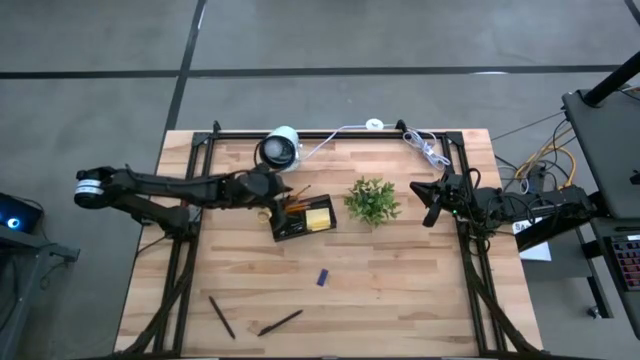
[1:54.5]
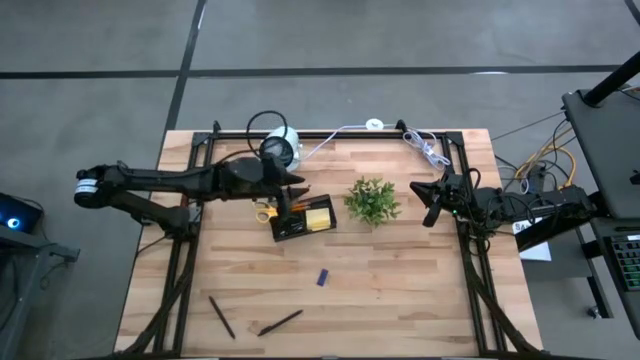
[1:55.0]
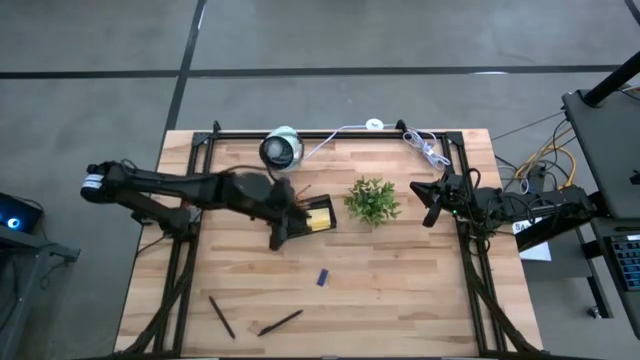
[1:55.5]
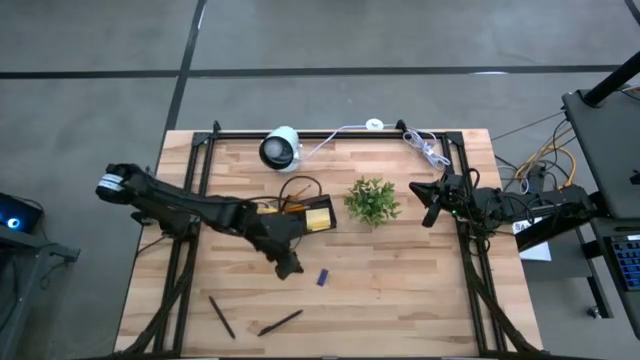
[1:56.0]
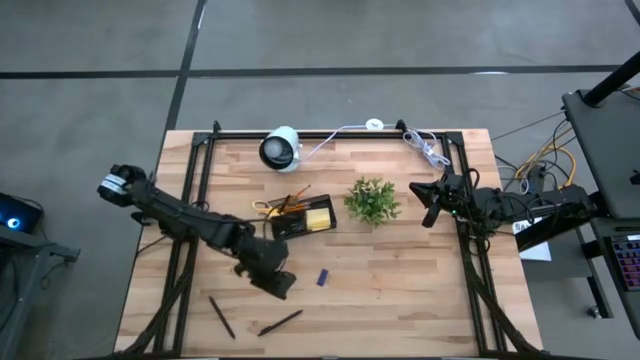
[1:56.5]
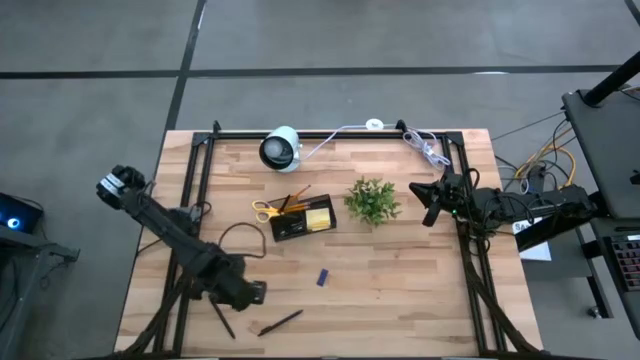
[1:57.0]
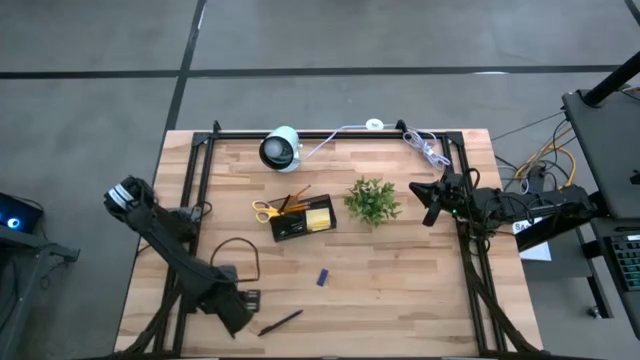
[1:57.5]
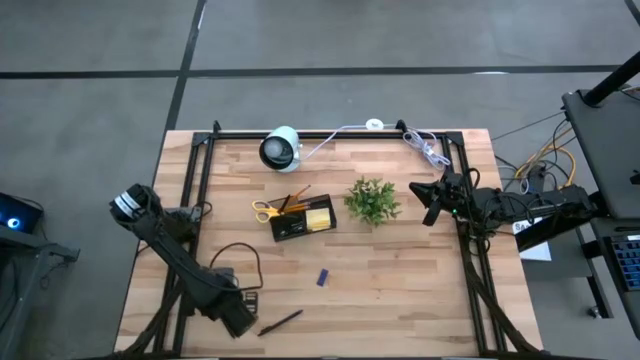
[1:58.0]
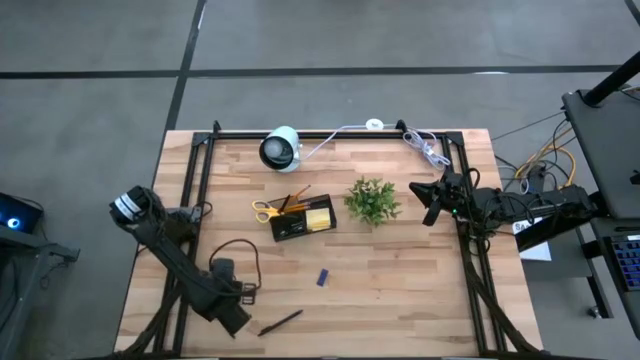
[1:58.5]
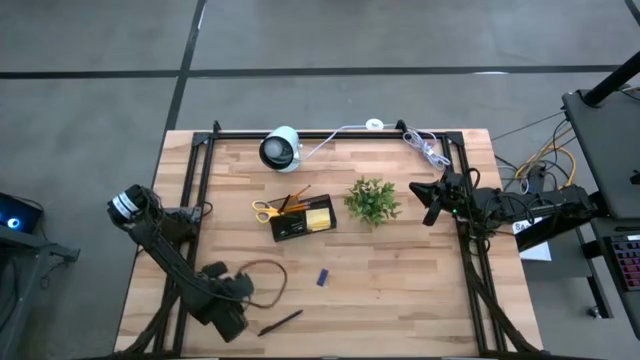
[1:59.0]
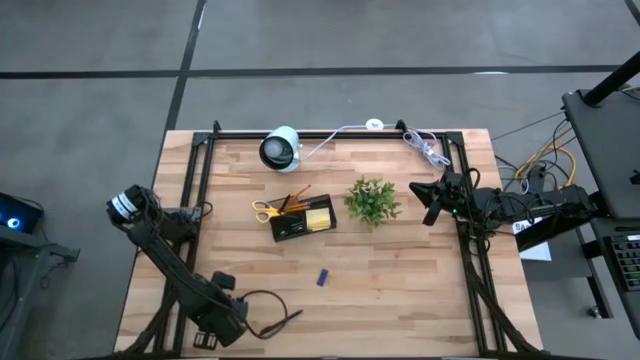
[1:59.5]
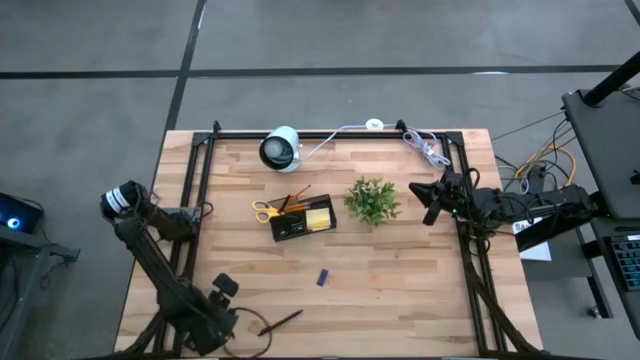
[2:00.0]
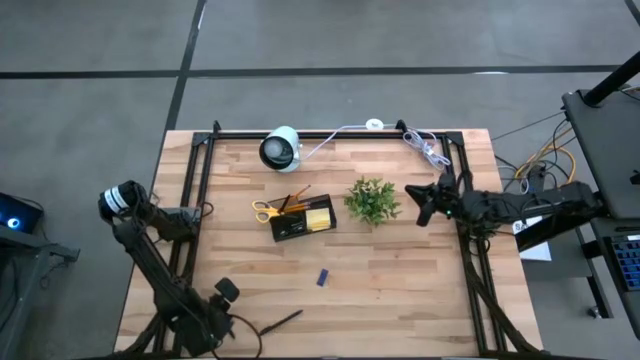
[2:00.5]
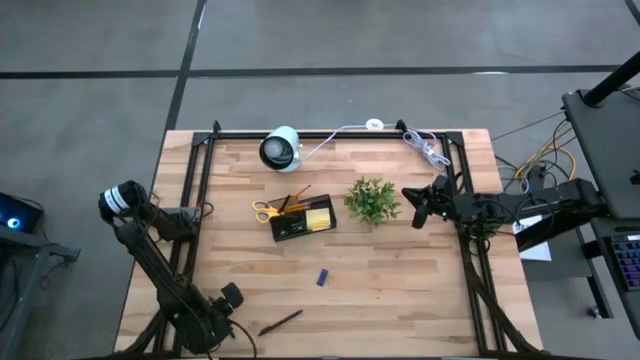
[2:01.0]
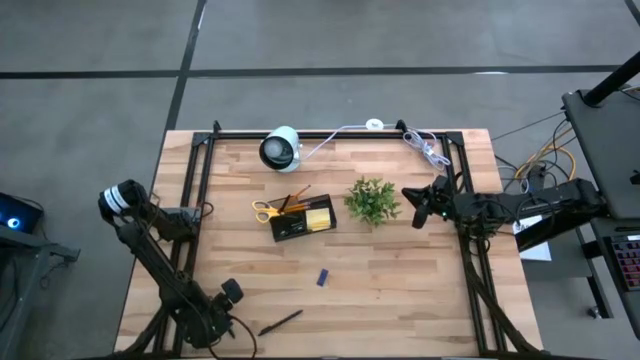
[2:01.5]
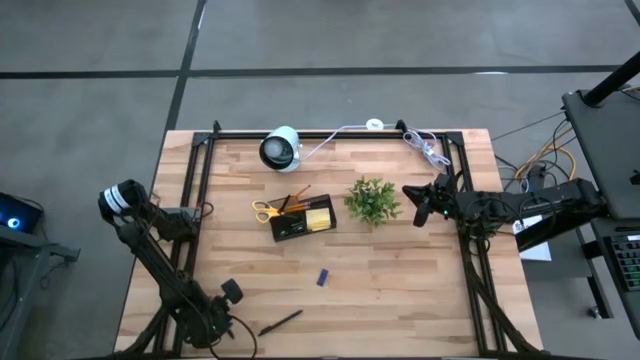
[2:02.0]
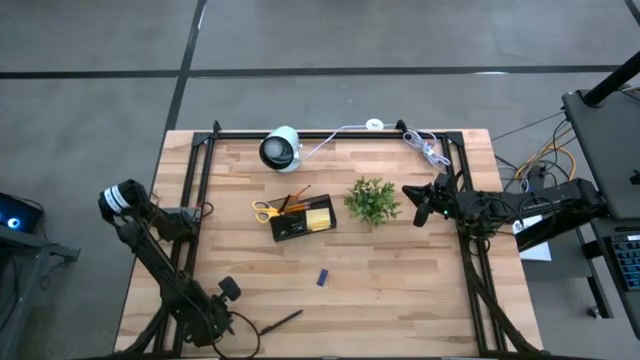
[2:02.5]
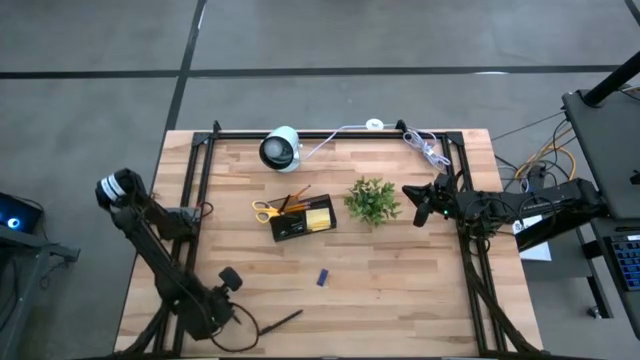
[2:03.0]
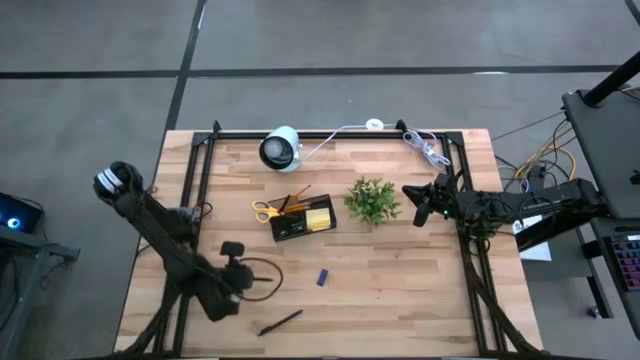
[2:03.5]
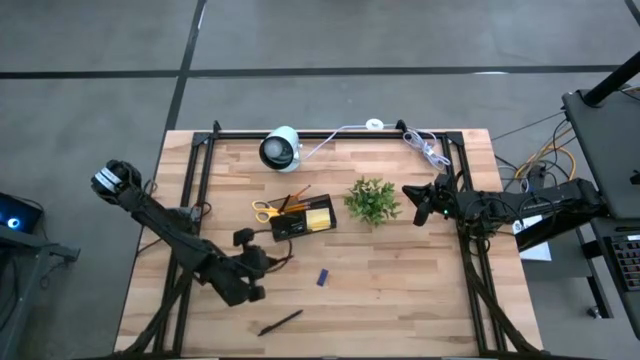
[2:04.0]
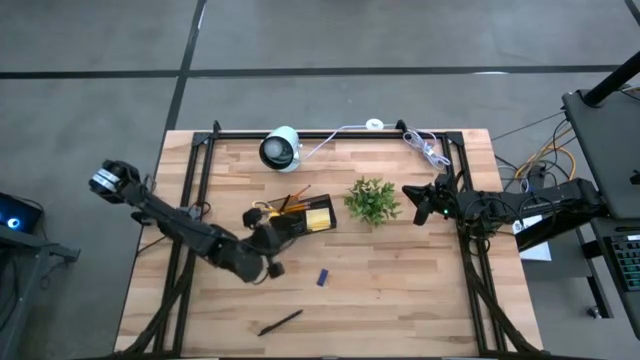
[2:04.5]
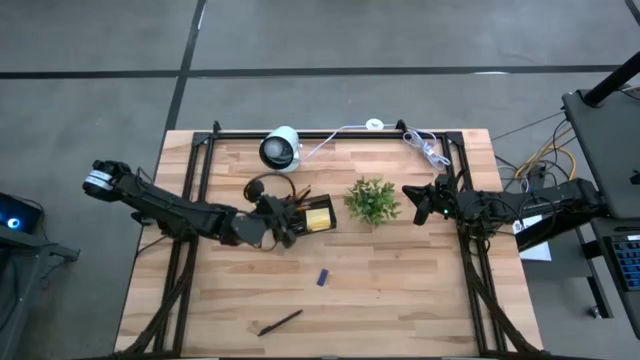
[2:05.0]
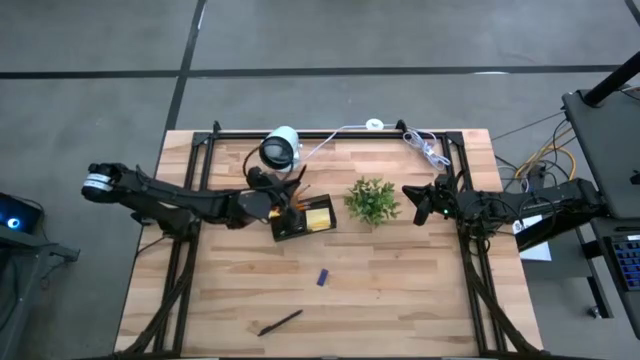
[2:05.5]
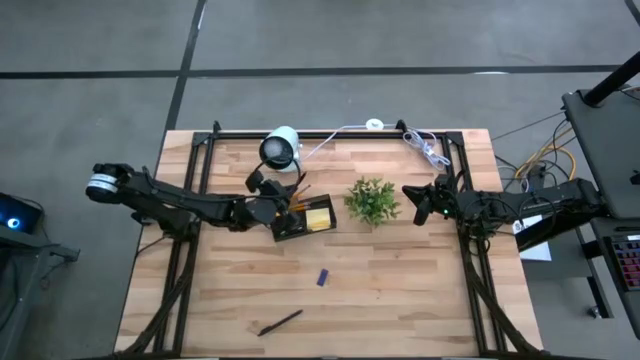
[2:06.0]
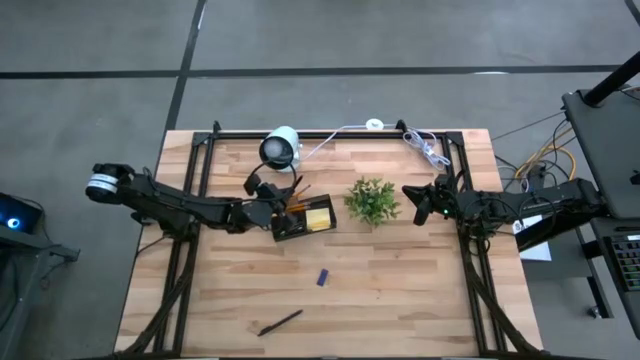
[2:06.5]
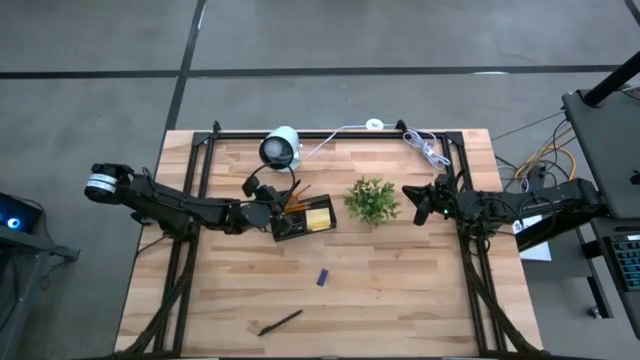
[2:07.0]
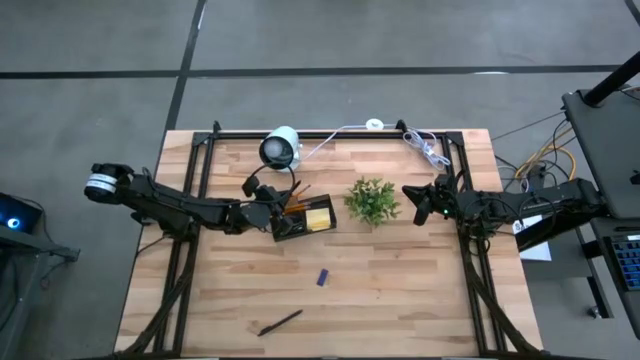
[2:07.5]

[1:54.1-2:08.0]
Task: Pick and place office supplies into organizer
Put the left black pen in the black desk organizer

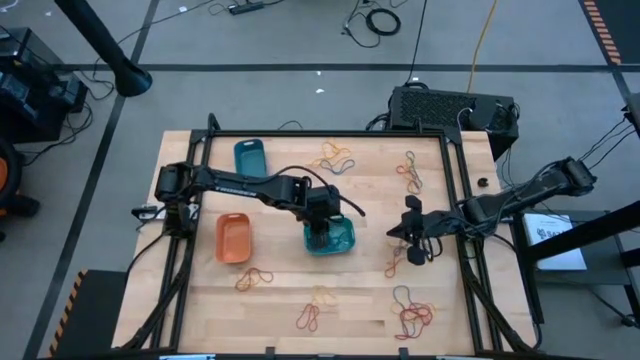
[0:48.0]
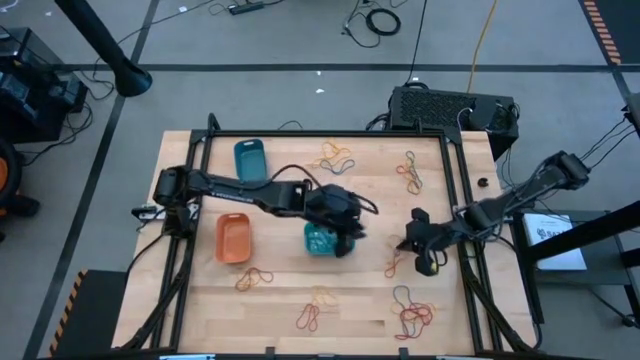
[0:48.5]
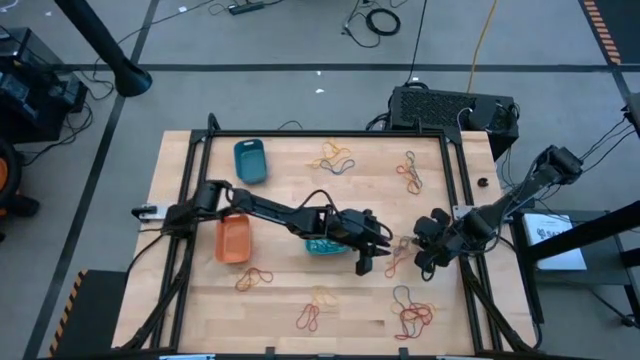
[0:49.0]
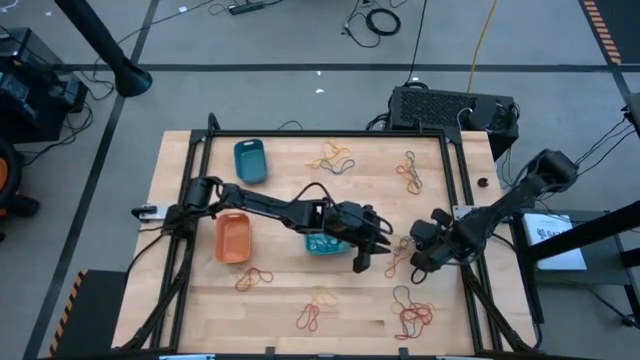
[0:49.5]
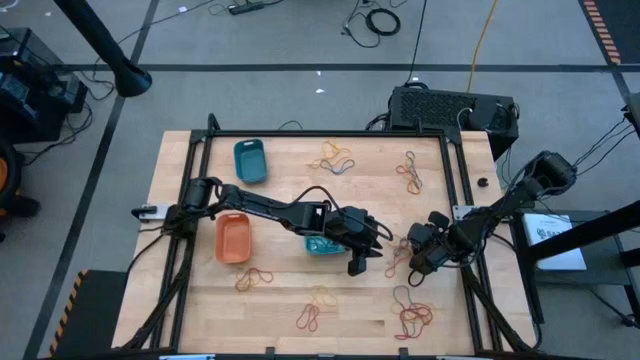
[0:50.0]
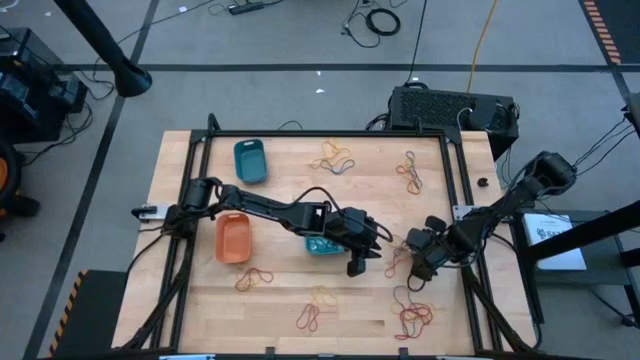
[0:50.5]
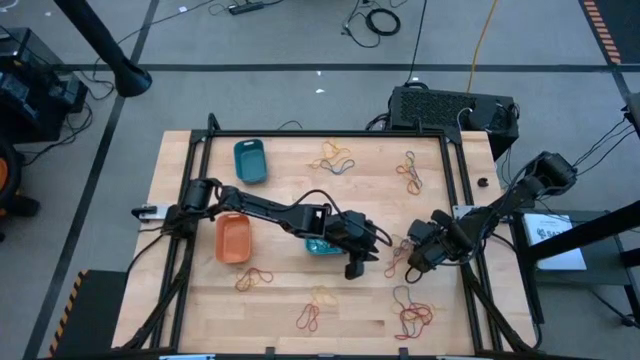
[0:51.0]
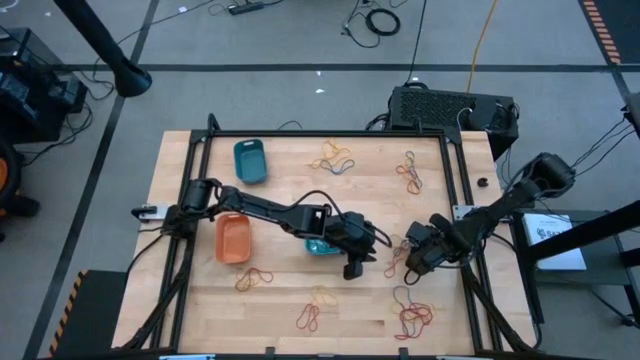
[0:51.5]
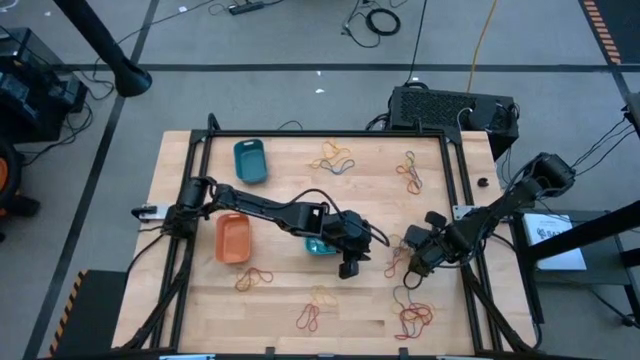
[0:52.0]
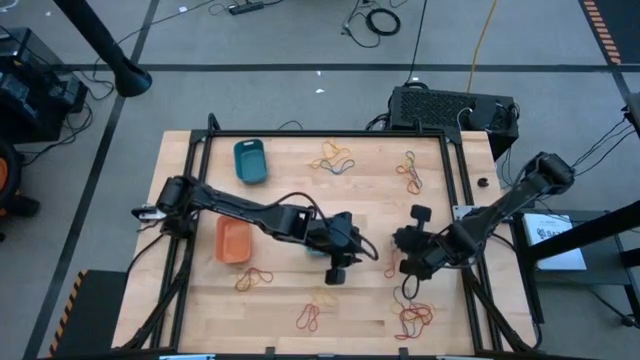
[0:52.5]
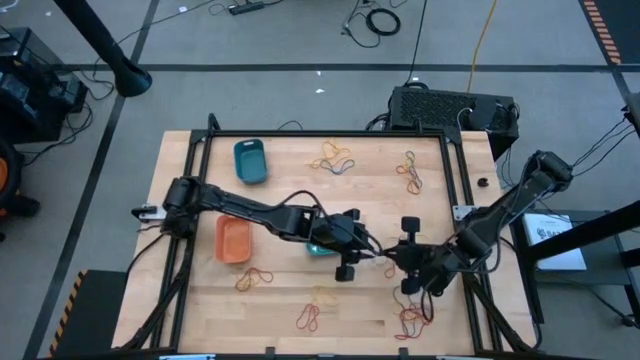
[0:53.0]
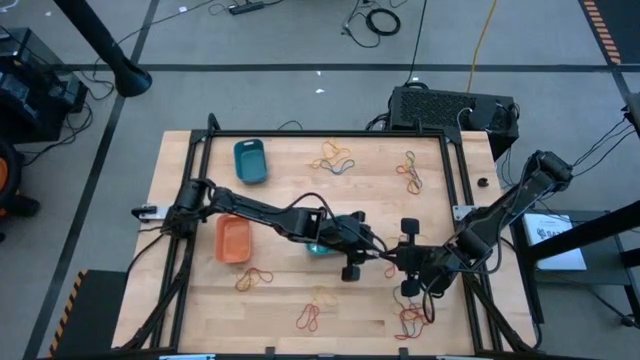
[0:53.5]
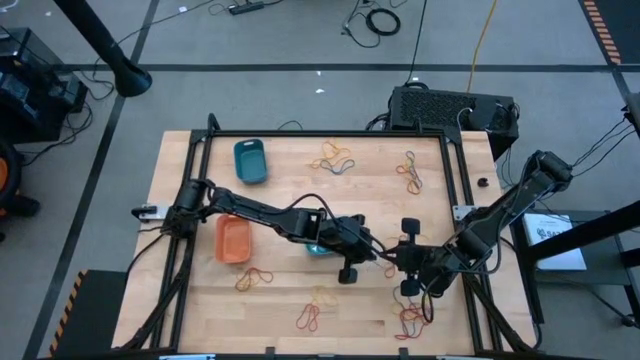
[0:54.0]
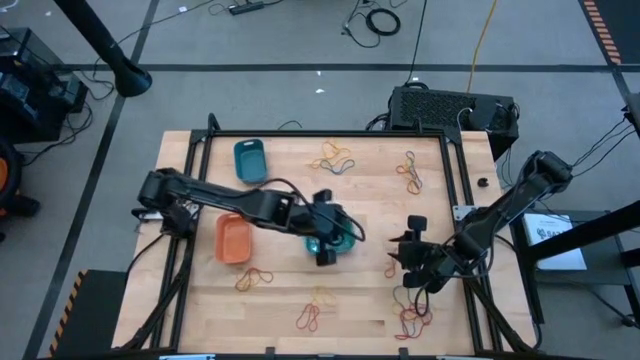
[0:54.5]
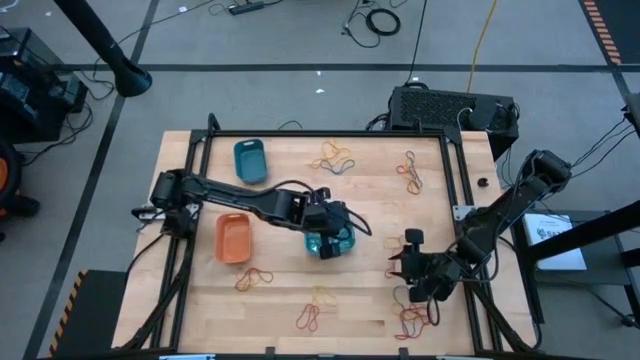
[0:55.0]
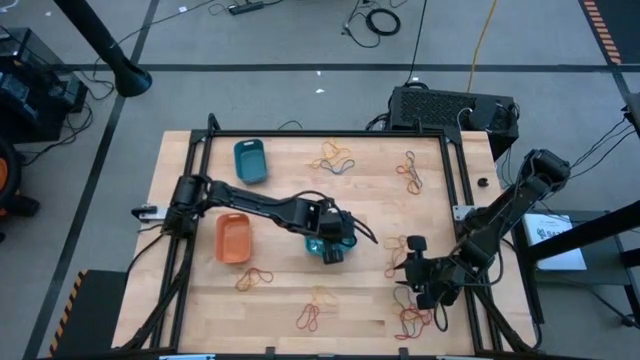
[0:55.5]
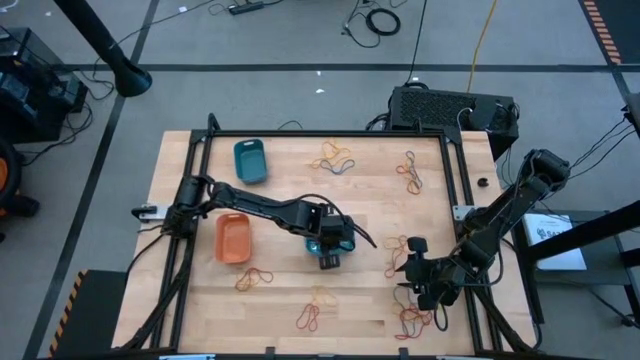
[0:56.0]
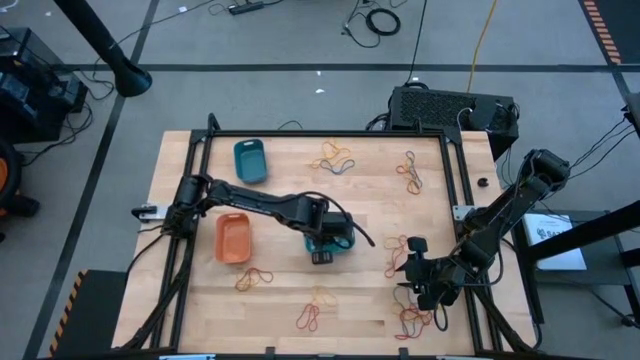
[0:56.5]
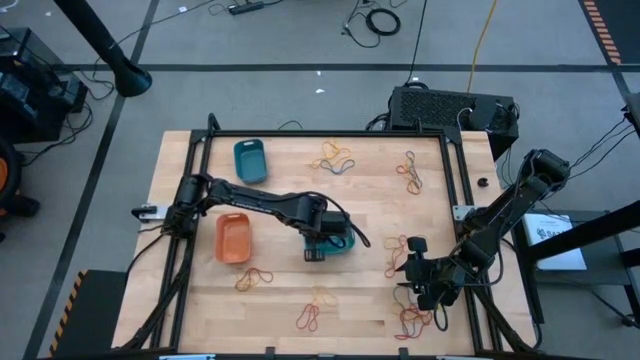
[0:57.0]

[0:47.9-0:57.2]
Task: Sort rubber bands into baskets
Put the blue rubber band into the green bin
